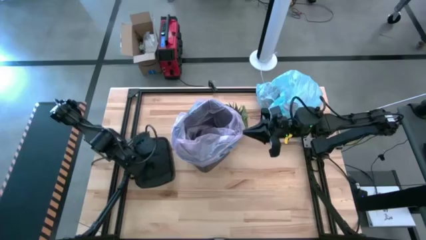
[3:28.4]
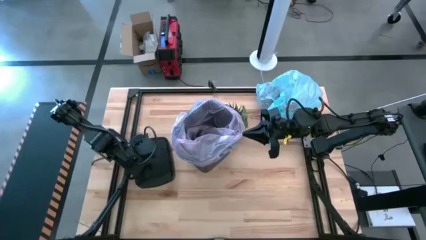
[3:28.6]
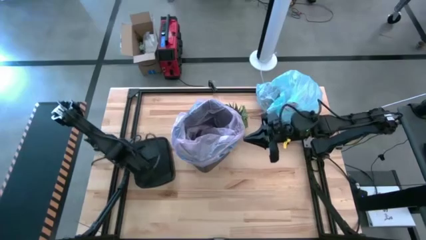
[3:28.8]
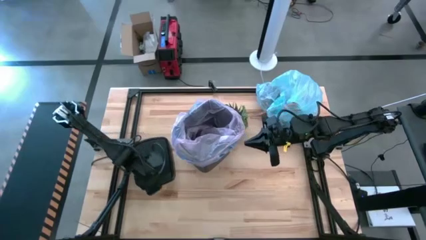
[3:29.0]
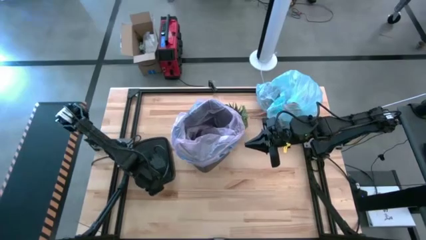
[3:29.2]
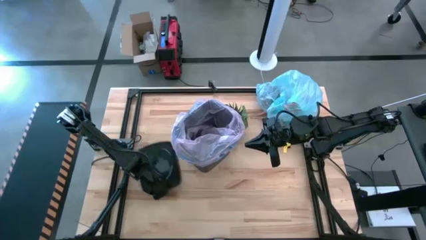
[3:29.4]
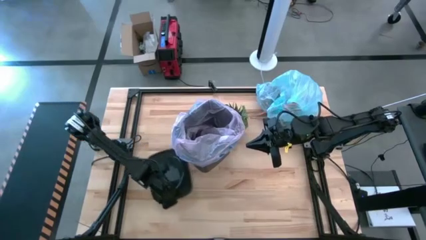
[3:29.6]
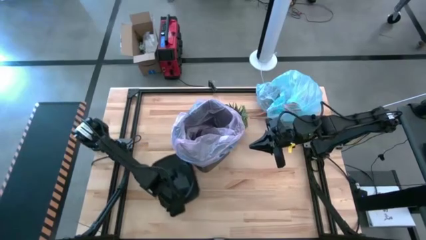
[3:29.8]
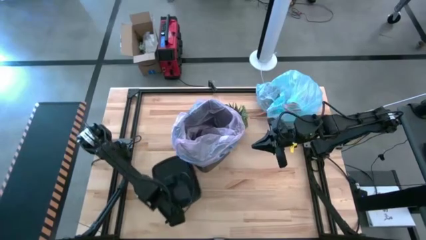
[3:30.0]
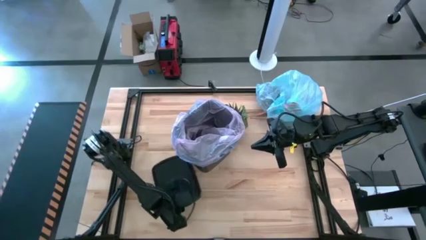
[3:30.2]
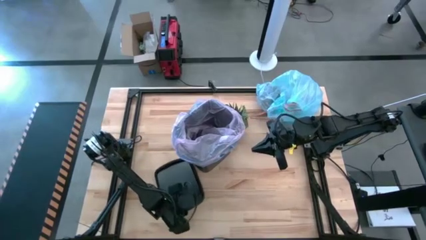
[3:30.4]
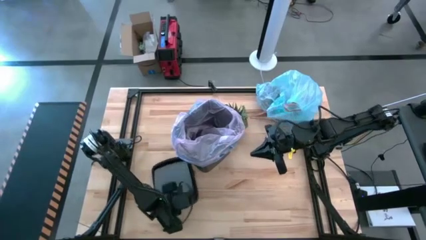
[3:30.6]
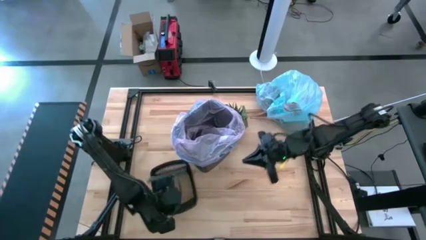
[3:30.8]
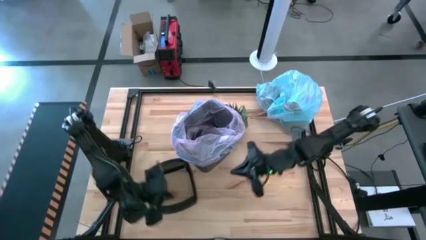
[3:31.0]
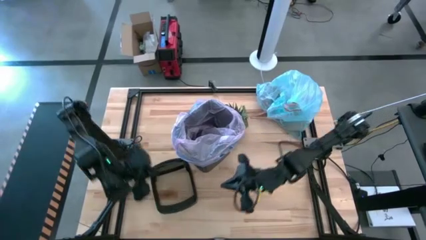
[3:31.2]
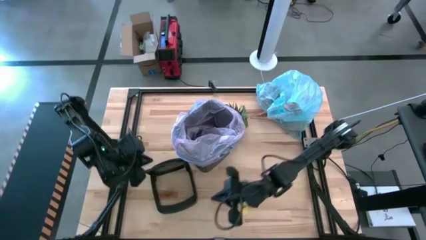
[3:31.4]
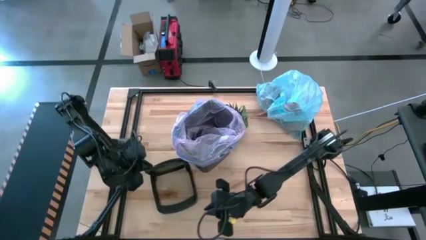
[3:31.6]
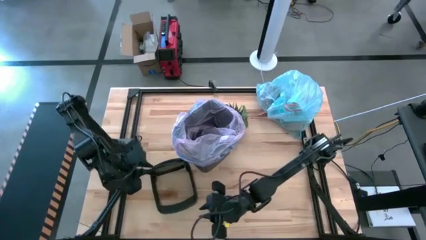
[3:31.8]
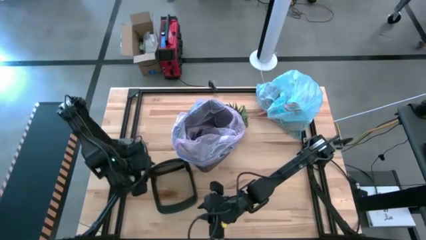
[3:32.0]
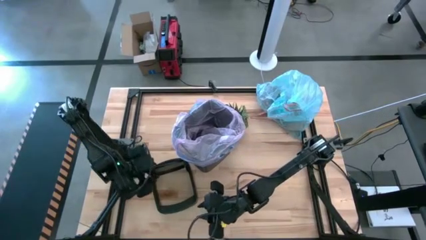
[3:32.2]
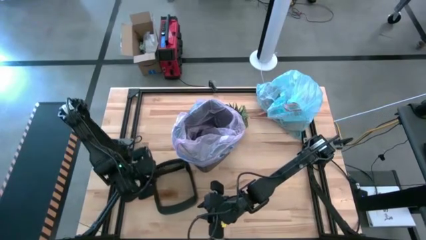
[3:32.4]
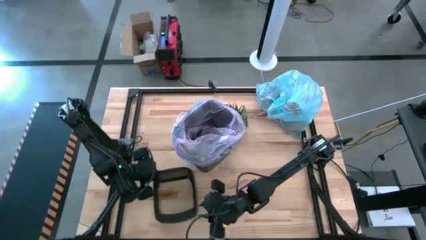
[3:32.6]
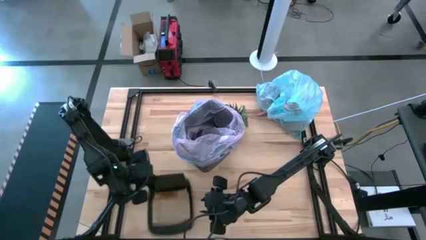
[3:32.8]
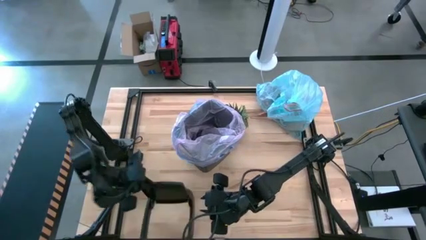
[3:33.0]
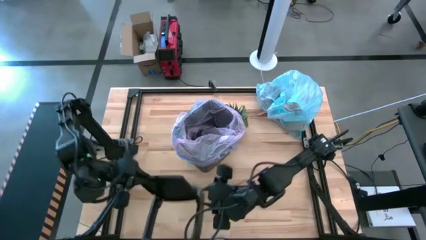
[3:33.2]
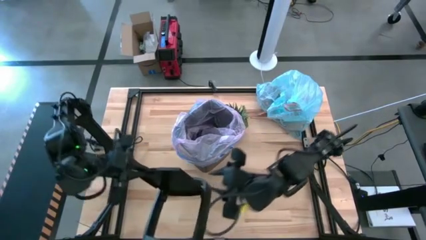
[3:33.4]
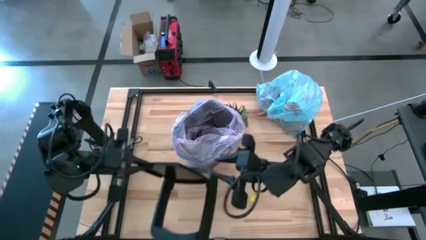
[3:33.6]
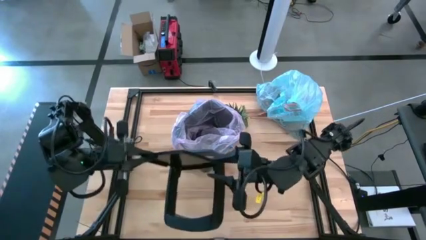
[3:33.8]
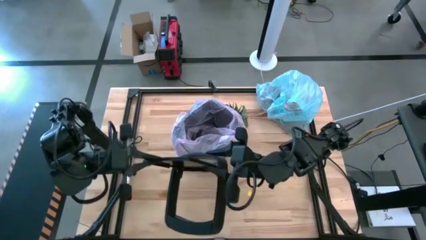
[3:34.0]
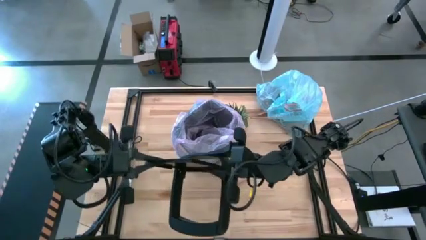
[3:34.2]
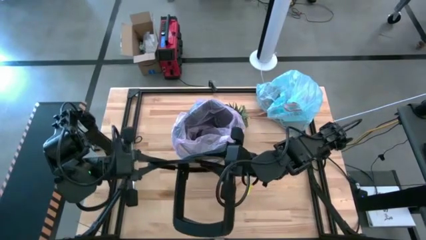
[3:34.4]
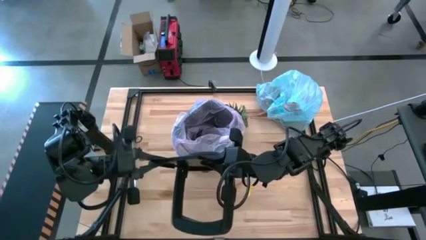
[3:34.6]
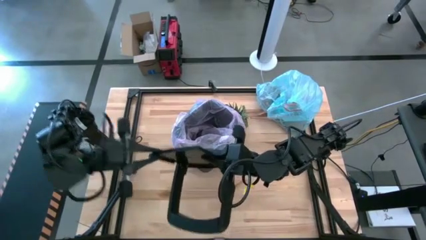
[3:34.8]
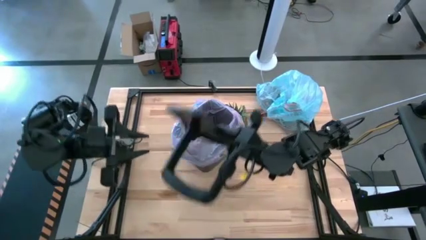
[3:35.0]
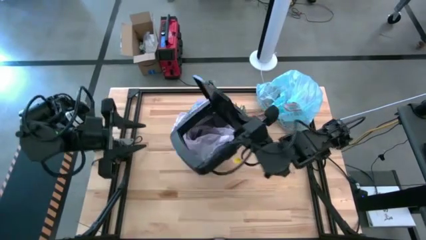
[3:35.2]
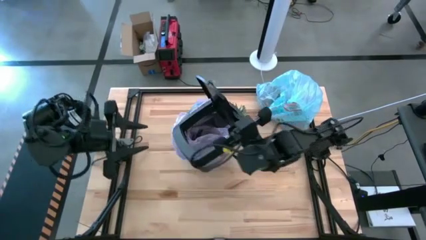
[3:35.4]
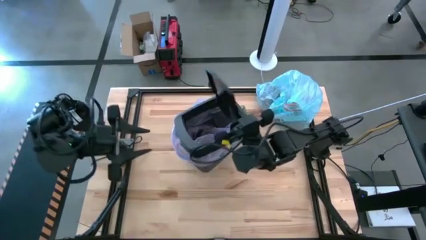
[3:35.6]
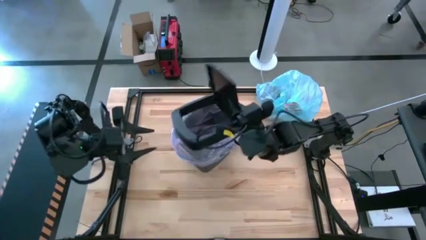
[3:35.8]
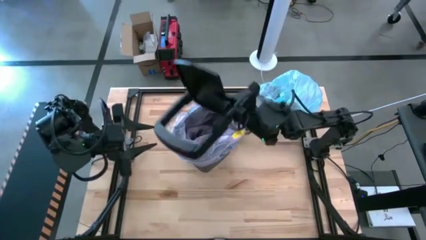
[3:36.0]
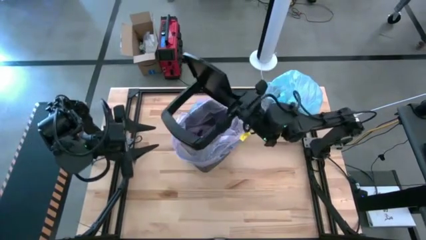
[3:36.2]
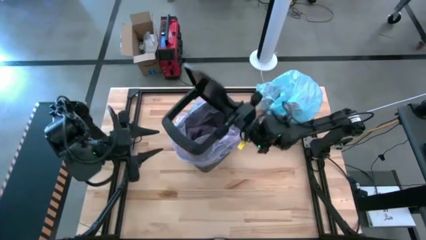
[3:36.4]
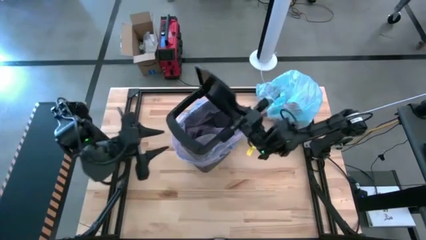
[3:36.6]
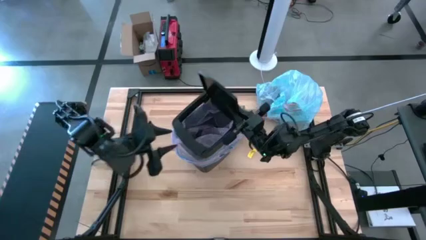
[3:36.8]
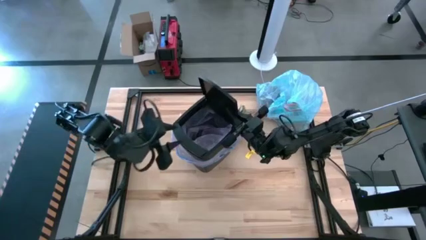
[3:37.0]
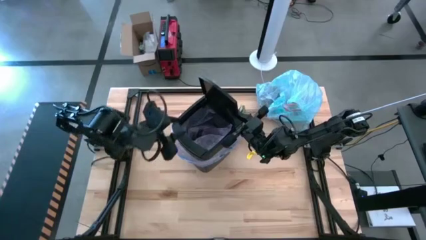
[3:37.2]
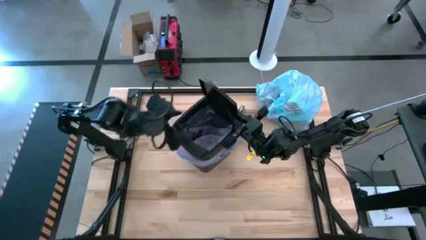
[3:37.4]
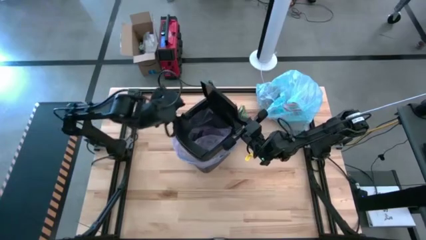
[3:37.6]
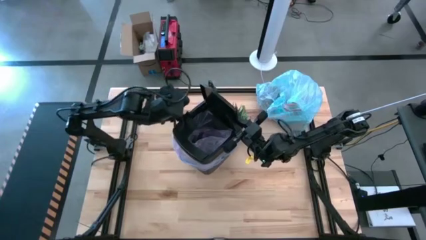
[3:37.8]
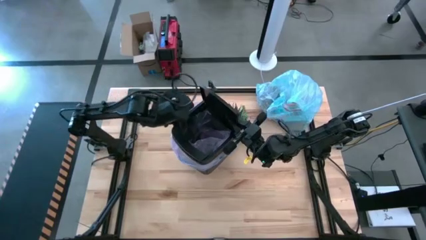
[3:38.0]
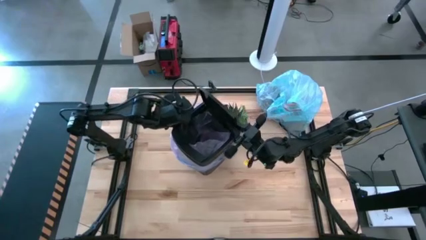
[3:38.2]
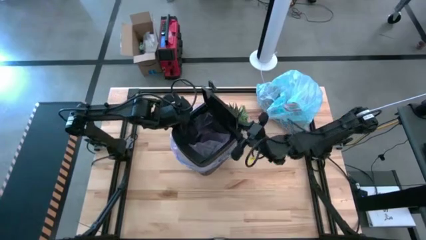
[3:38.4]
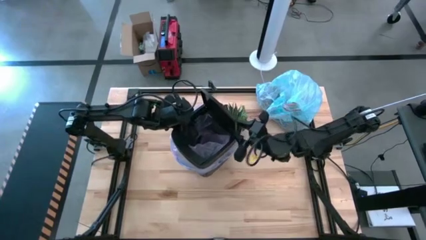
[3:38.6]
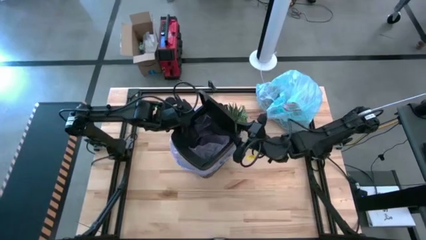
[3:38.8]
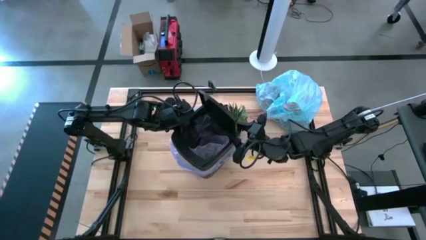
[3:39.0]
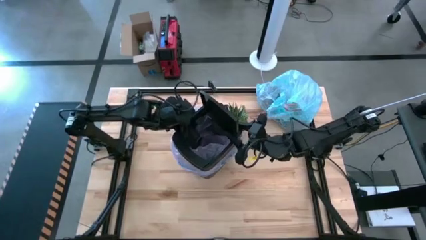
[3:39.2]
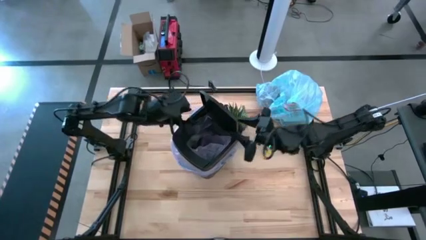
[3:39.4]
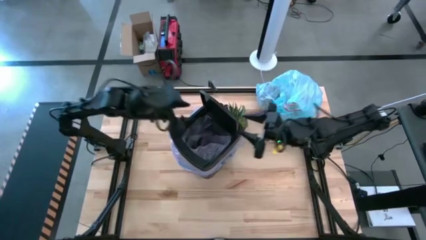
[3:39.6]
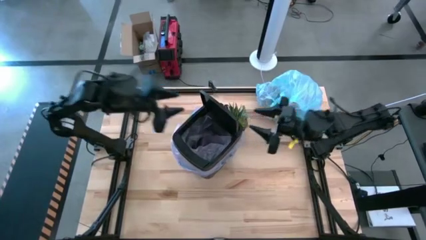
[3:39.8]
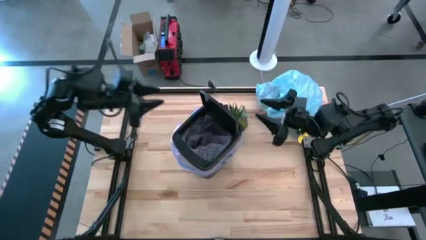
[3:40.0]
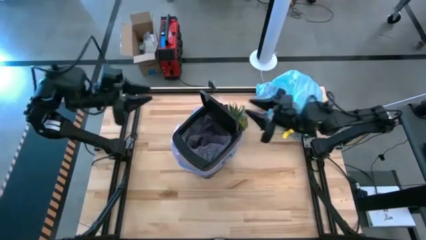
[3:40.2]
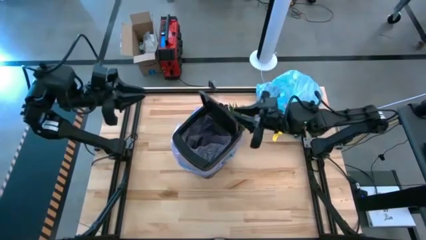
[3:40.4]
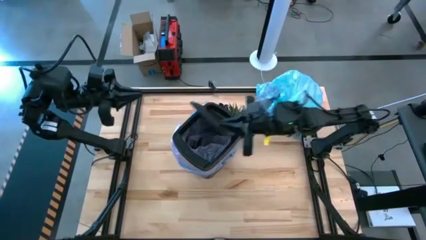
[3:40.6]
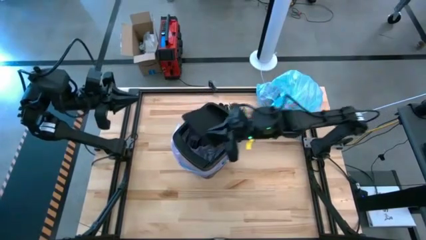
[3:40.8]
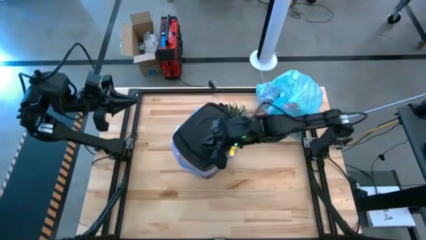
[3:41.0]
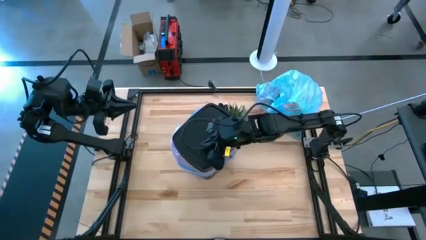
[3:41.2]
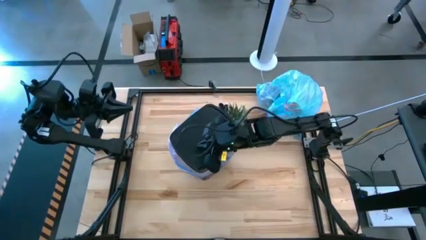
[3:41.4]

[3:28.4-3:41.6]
Task: place trash/remove bag and relplace
Close the trash bin

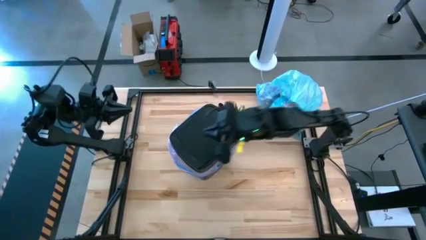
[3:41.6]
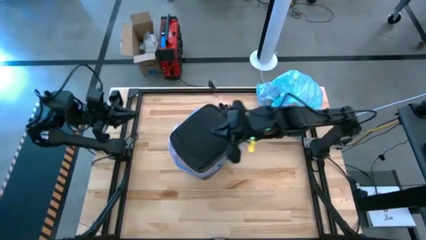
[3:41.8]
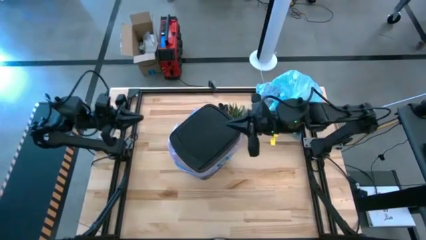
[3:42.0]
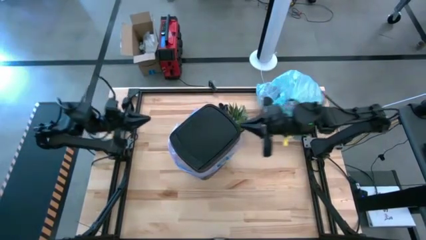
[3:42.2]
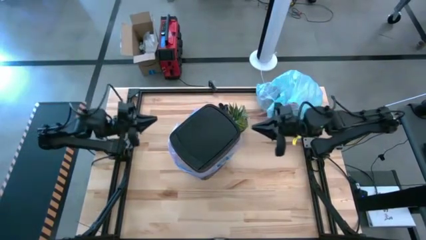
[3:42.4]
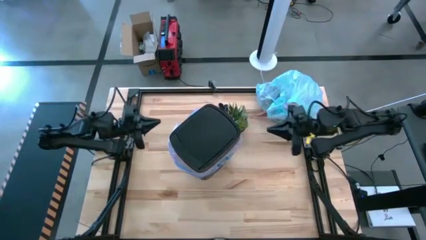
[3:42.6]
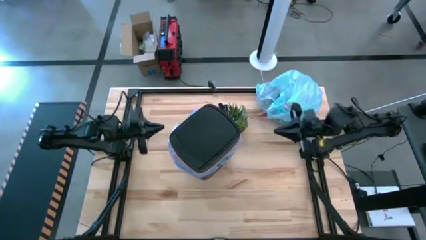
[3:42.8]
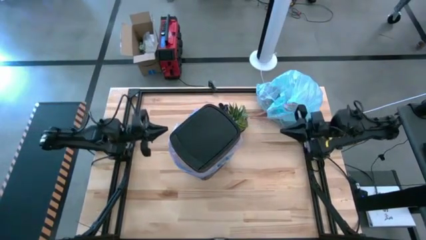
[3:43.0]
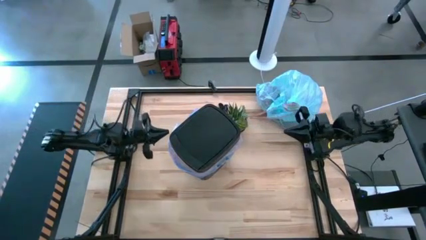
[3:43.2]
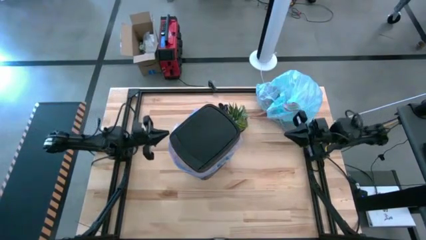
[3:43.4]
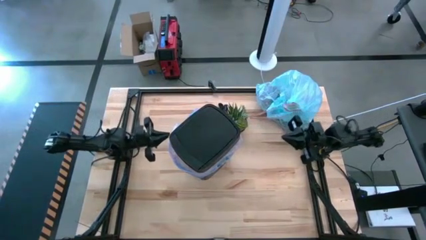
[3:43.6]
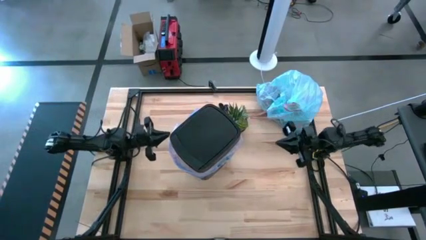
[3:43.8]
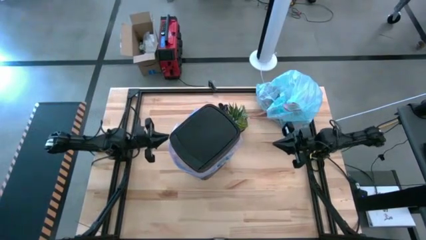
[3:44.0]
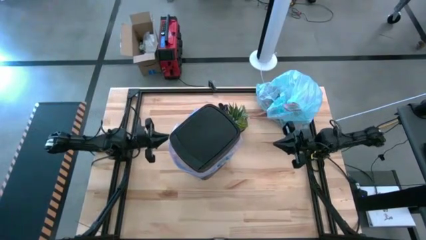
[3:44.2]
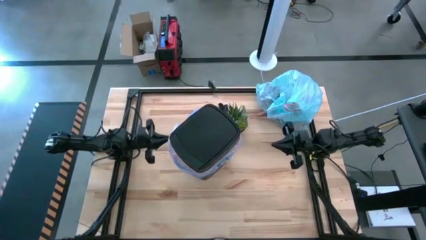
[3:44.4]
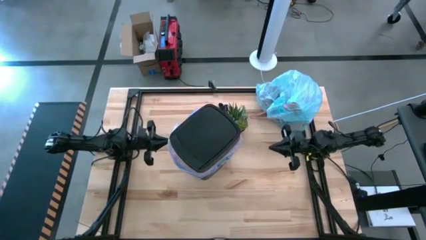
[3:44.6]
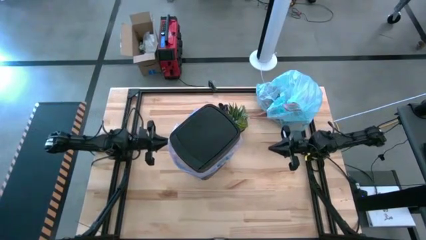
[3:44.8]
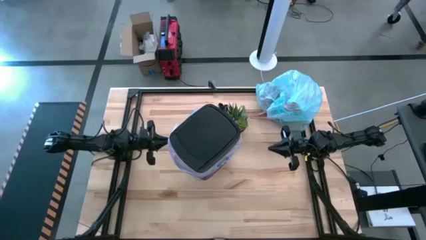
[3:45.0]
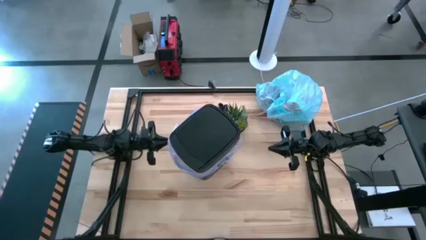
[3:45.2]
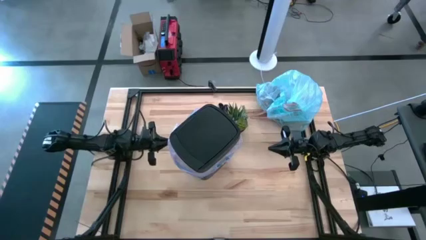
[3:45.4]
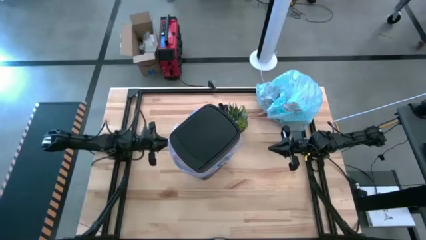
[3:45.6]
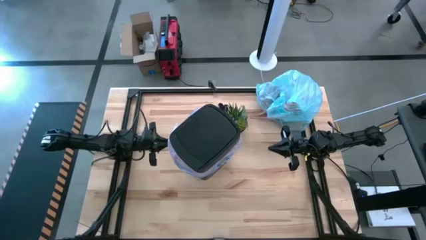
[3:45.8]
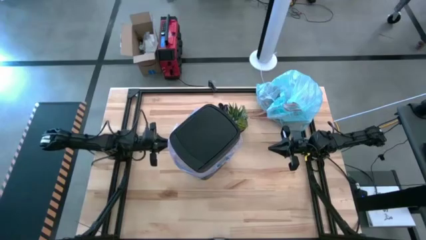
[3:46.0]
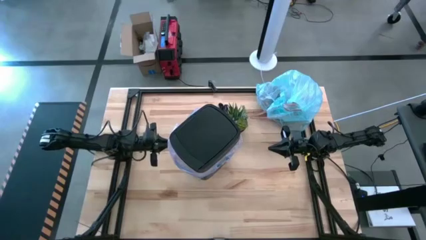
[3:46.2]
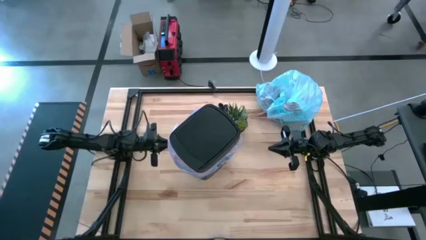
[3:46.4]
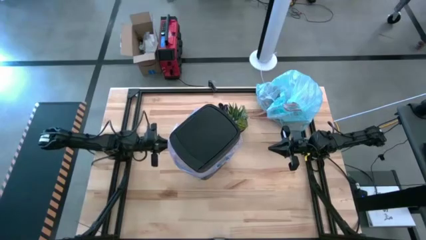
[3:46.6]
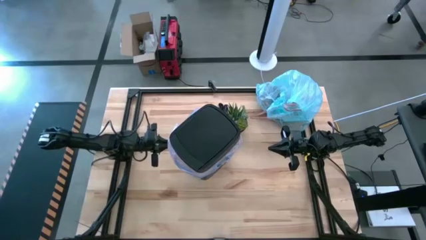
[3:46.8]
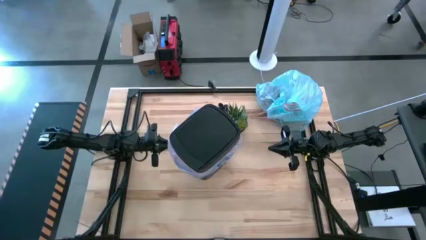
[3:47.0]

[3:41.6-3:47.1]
Return to Home Position
